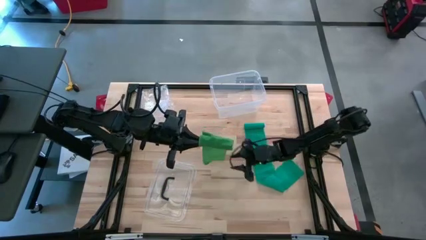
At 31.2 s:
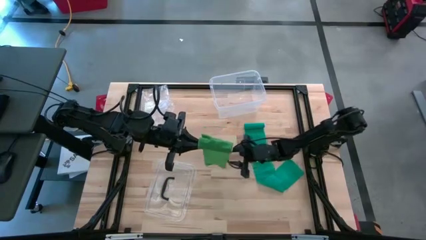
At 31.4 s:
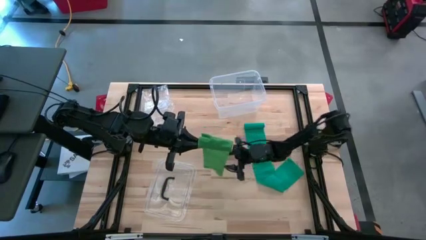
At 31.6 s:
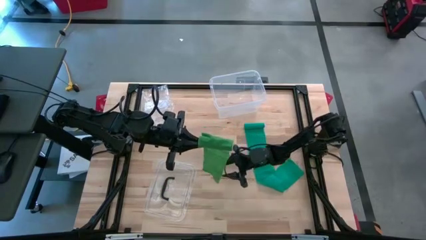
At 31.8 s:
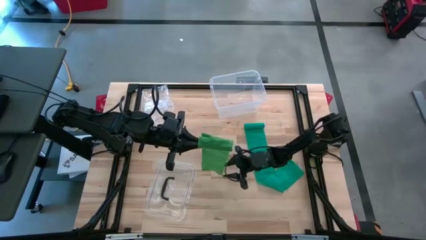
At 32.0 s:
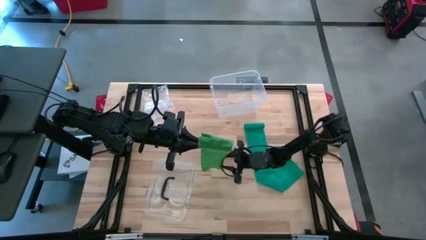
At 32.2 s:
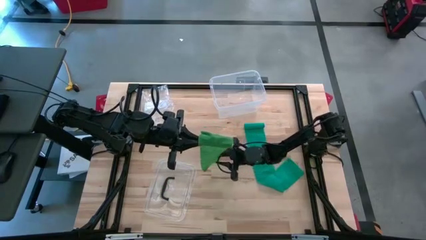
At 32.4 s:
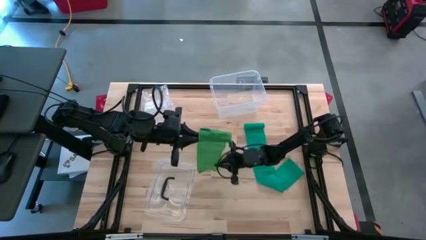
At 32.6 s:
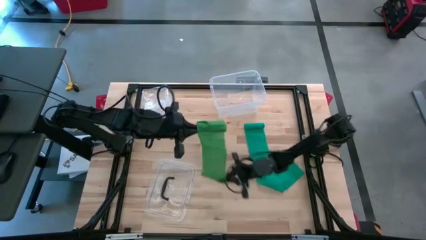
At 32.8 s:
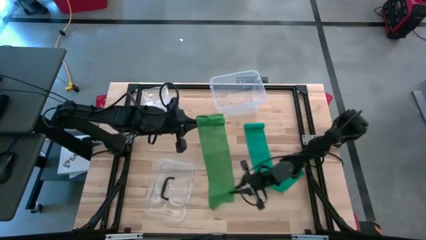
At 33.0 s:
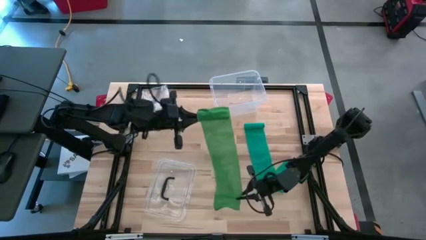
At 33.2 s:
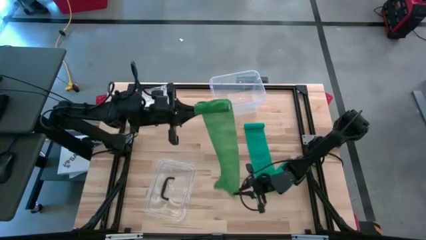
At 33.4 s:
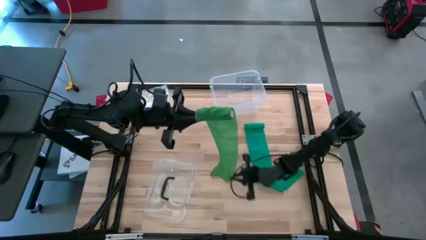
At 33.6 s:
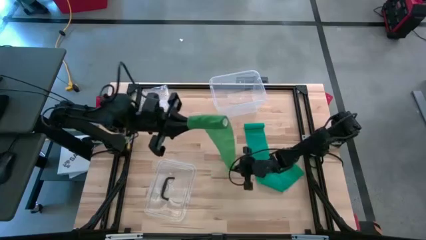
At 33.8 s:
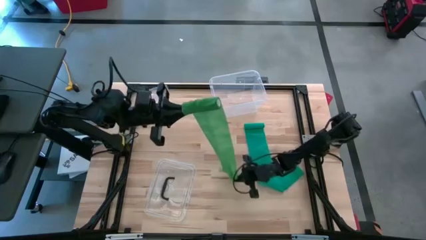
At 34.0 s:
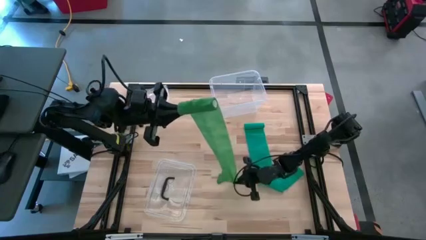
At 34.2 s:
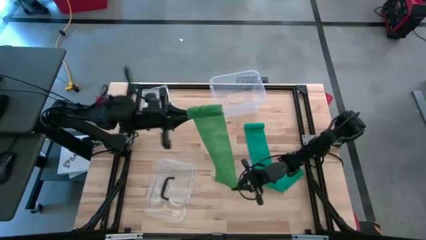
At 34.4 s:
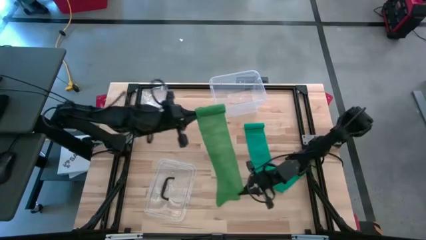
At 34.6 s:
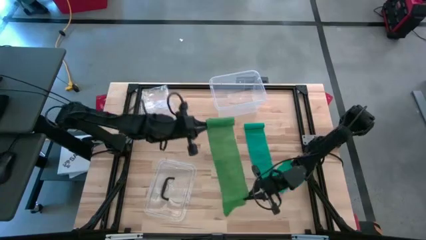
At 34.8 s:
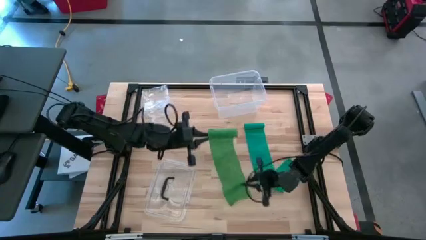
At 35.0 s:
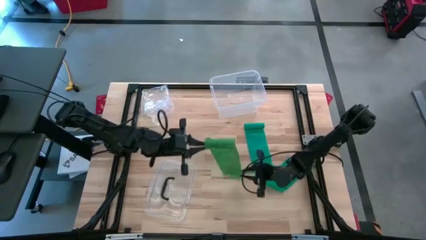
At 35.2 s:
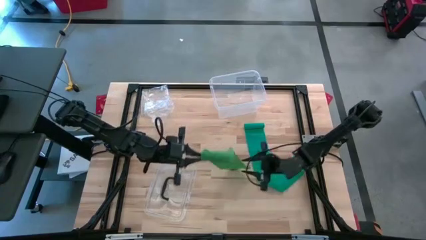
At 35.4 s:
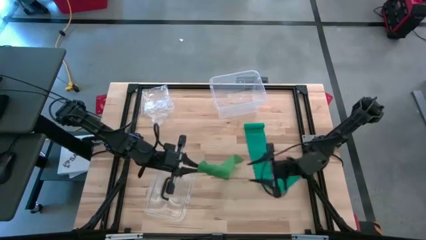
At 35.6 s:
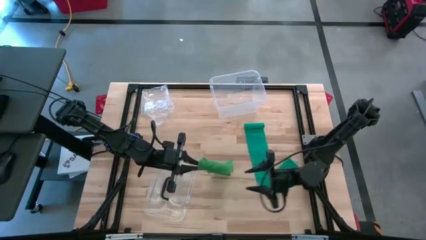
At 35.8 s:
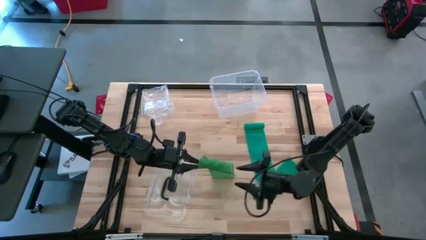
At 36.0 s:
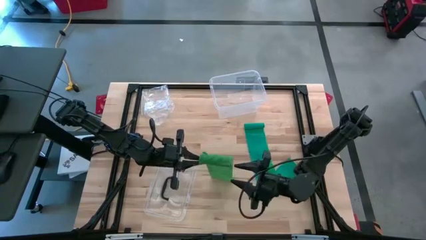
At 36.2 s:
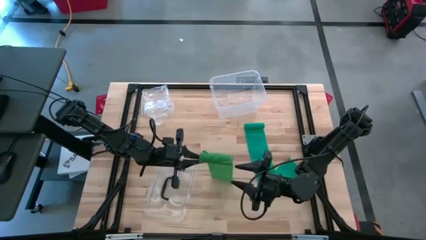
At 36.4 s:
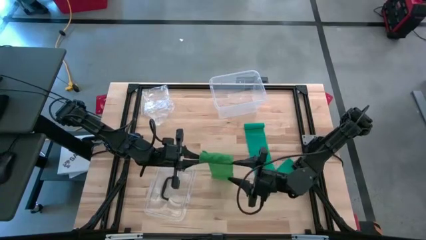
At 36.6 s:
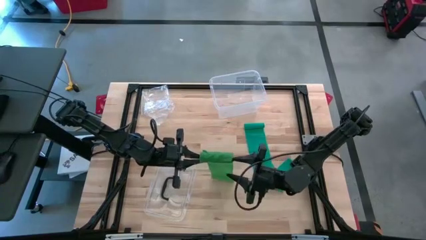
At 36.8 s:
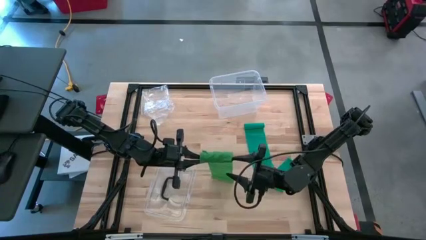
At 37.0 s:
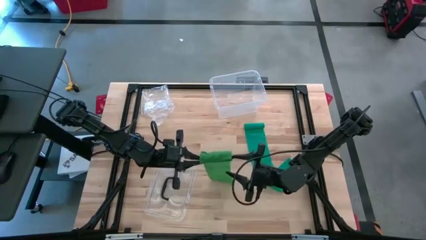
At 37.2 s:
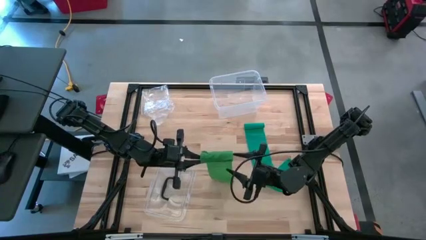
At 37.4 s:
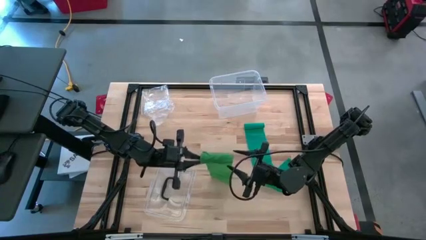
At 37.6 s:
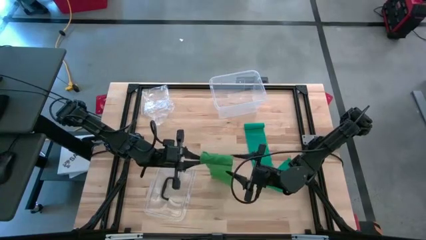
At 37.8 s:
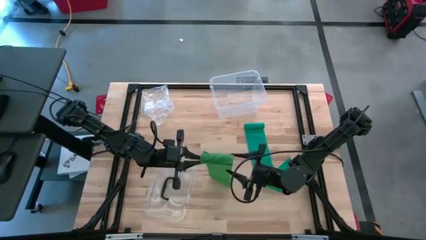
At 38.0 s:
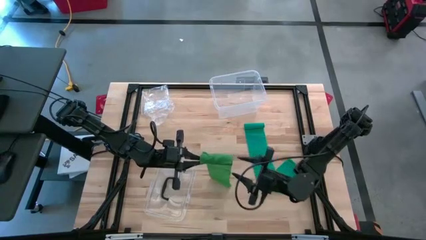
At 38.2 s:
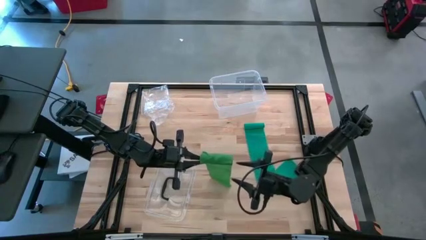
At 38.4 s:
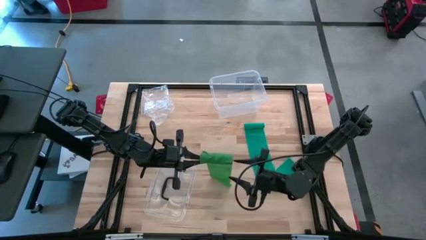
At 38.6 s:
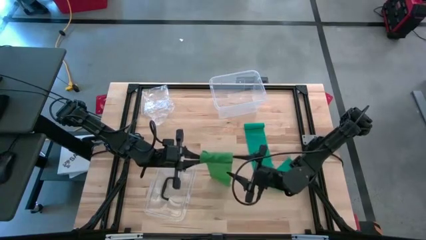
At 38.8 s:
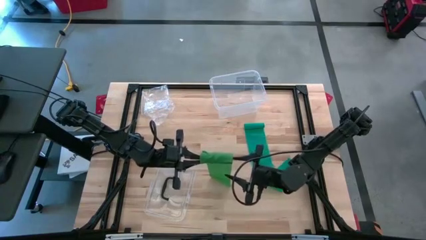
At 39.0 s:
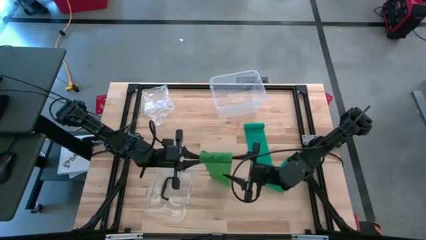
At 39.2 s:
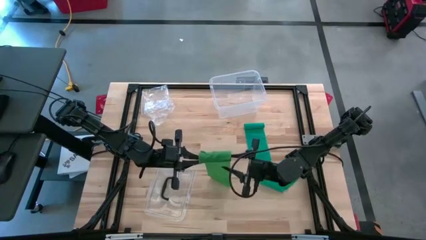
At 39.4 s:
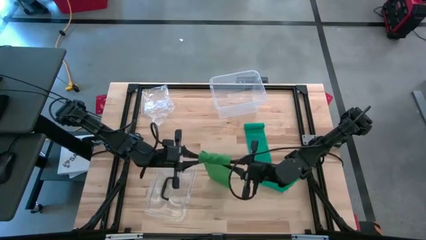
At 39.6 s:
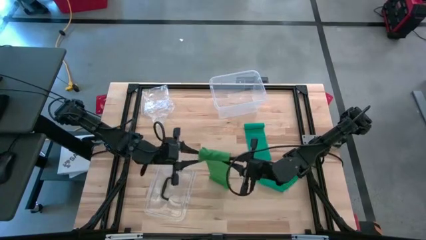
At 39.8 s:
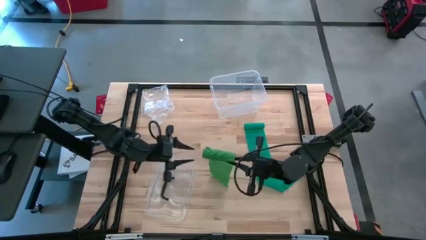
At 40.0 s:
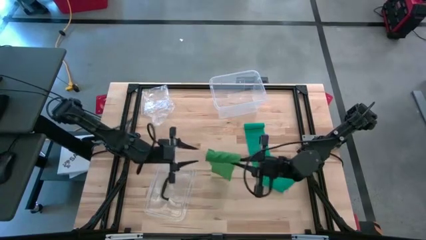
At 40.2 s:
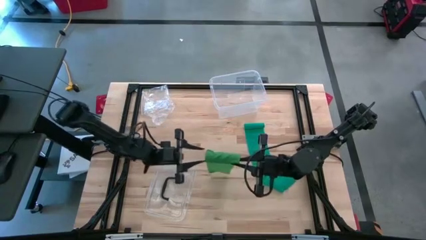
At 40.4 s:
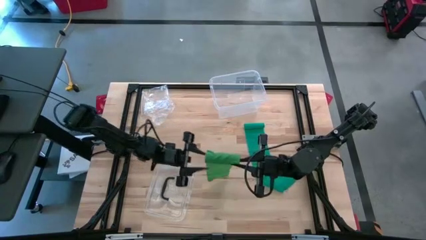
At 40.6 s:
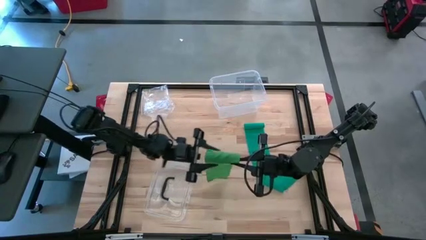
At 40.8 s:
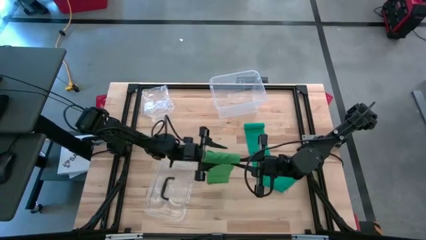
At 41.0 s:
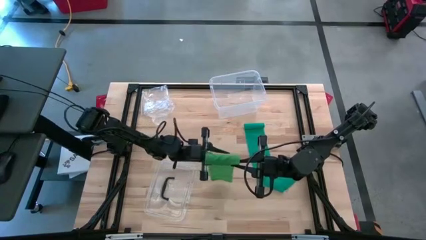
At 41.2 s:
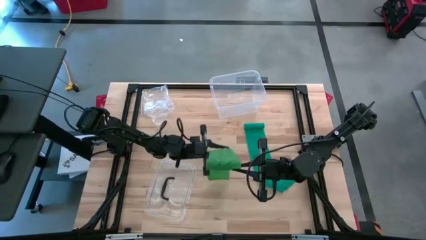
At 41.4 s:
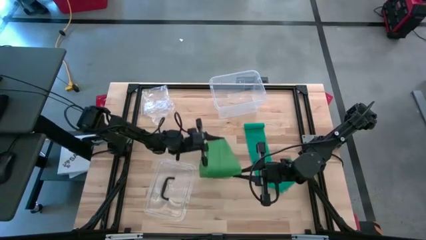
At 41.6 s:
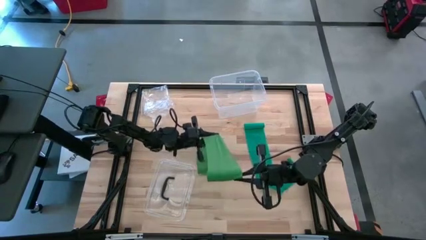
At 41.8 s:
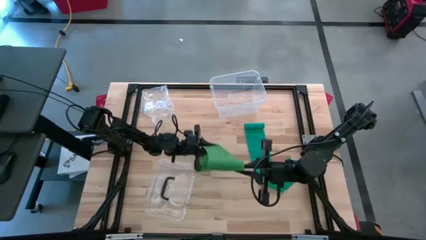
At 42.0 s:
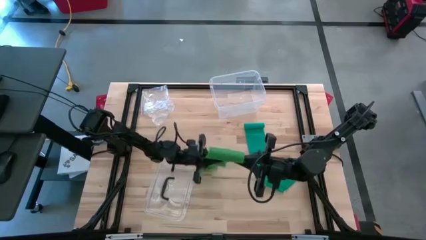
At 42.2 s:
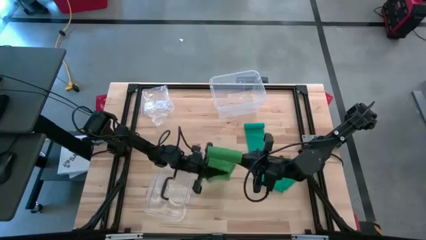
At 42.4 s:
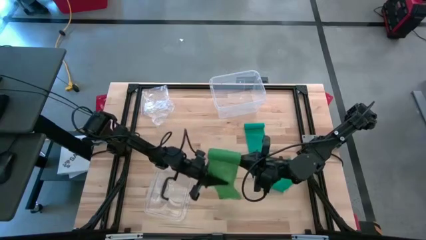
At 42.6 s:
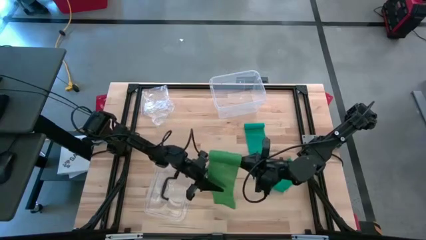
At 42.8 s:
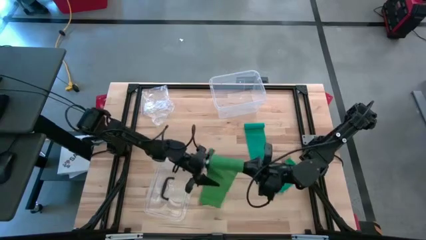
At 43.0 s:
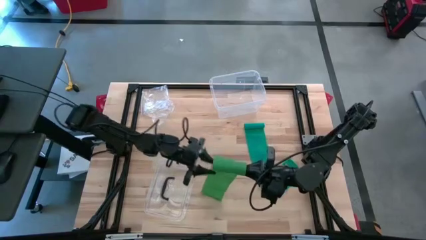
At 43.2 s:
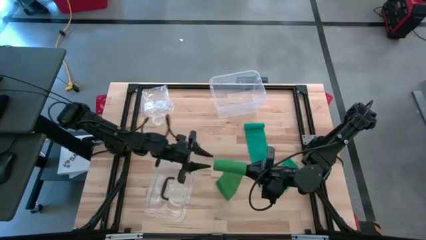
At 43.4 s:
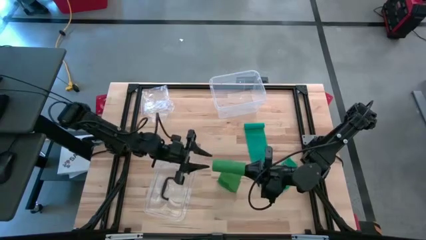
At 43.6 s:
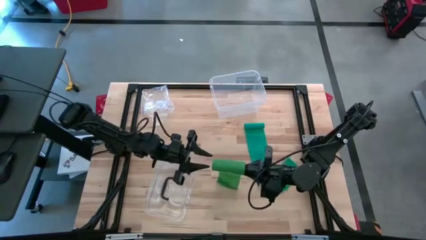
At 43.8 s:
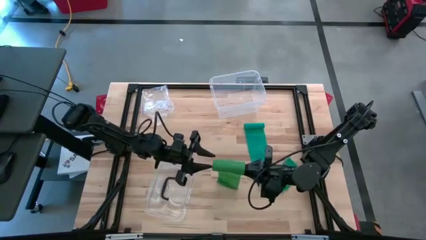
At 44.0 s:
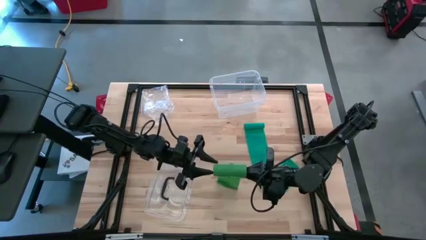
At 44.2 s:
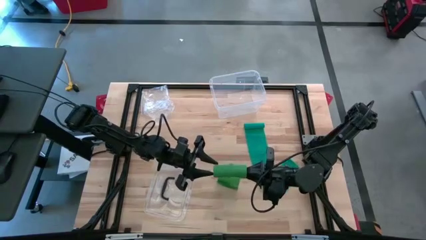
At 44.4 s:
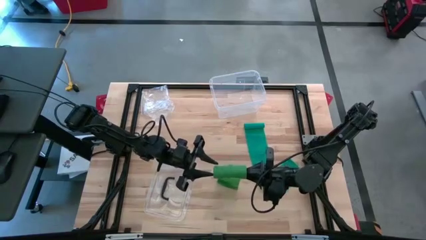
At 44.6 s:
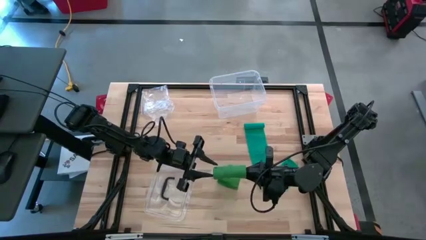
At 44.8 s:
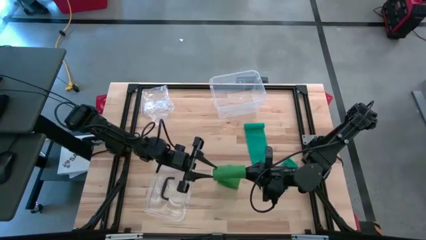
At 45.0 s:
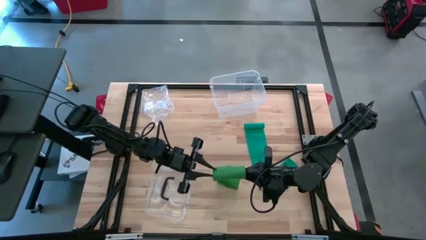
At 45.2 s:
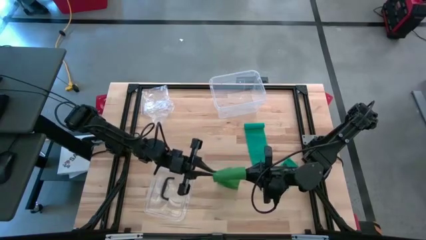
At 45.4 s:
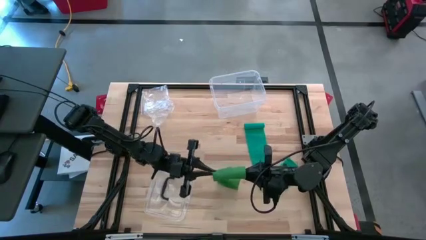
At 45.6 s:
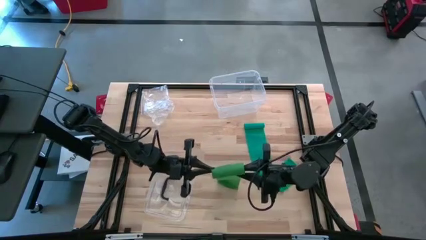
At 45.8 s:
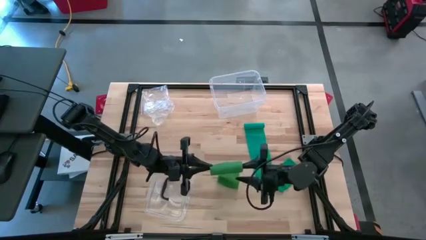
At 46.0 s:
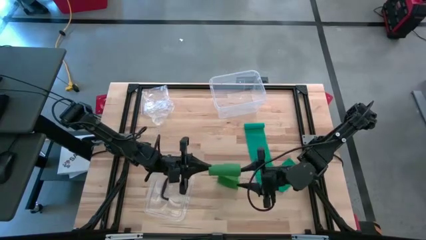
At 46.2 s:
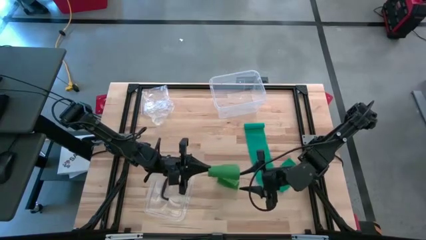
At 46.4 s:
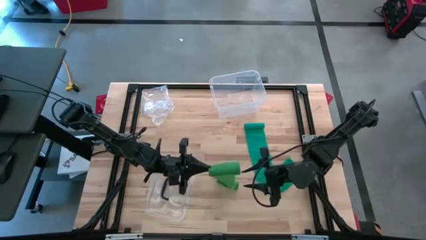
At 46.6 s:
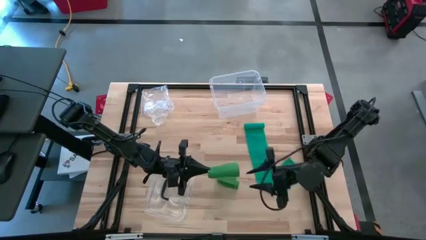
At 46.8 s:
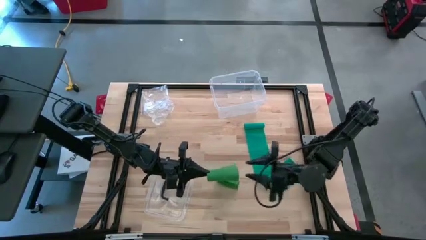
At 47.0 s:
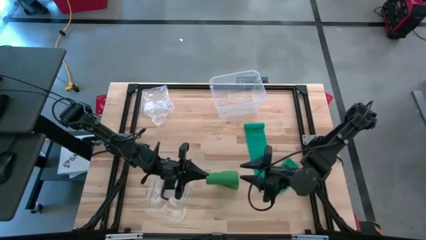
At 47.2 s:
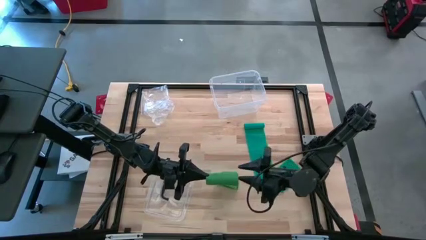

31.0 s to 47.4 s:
Task: Roll bandage
Roll the green bandage
